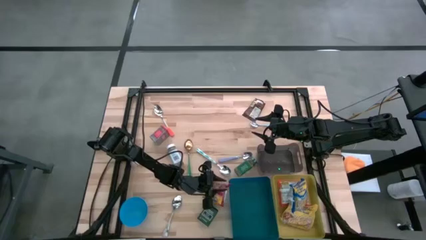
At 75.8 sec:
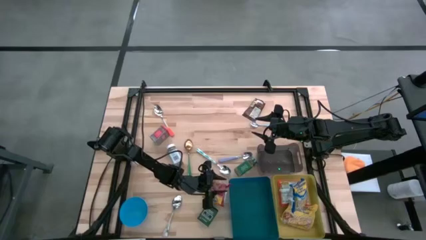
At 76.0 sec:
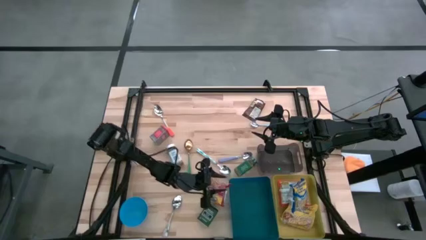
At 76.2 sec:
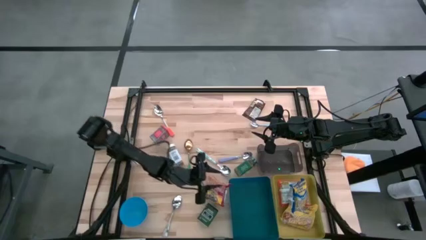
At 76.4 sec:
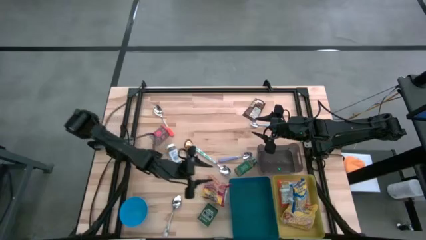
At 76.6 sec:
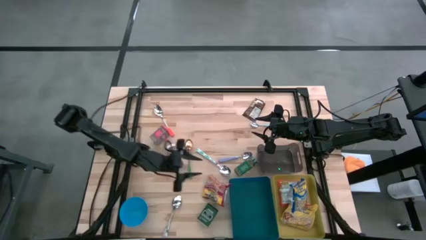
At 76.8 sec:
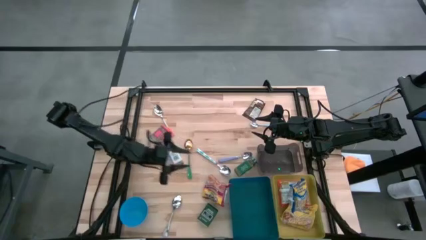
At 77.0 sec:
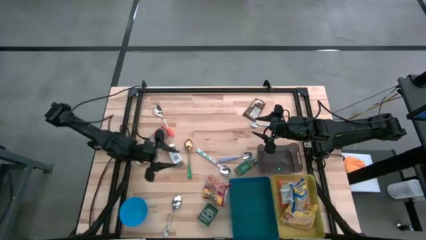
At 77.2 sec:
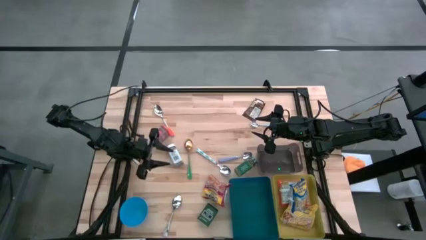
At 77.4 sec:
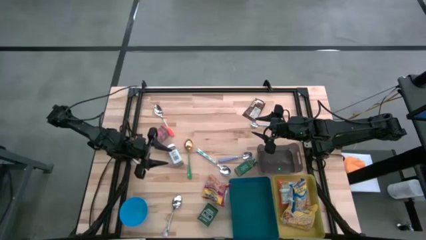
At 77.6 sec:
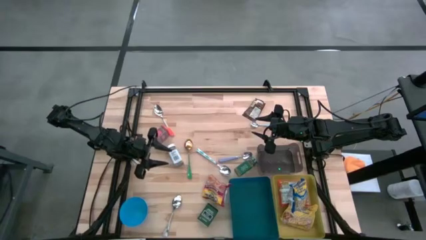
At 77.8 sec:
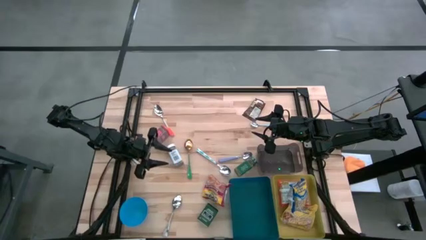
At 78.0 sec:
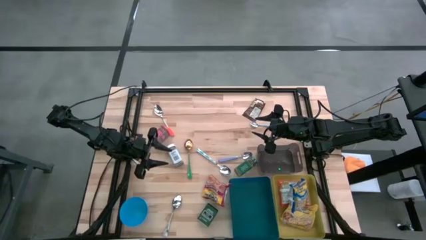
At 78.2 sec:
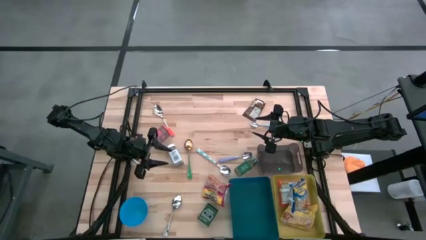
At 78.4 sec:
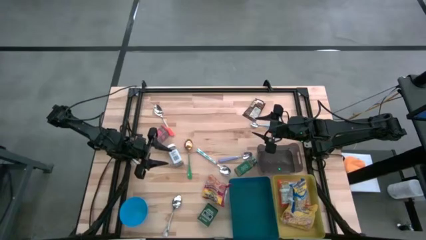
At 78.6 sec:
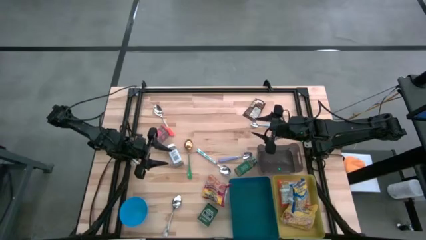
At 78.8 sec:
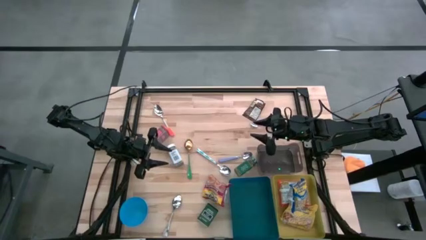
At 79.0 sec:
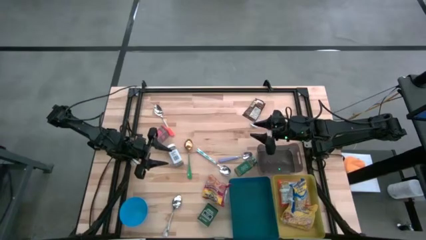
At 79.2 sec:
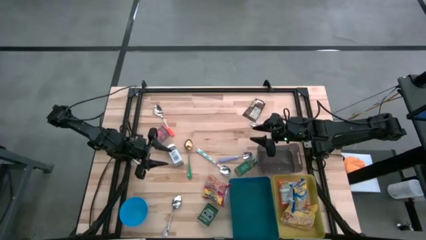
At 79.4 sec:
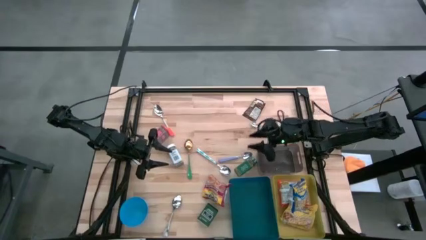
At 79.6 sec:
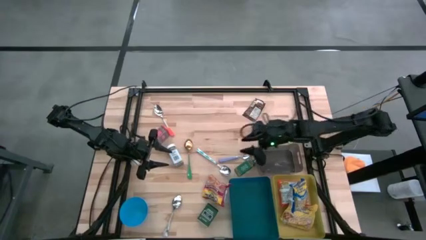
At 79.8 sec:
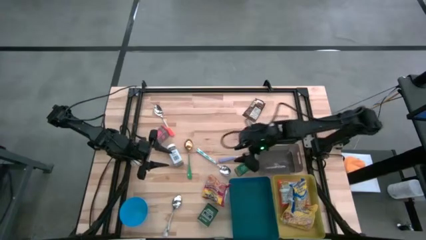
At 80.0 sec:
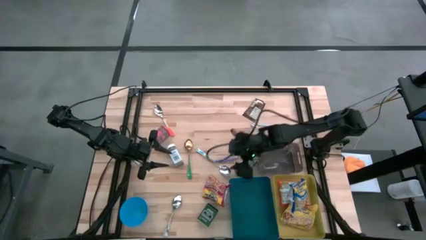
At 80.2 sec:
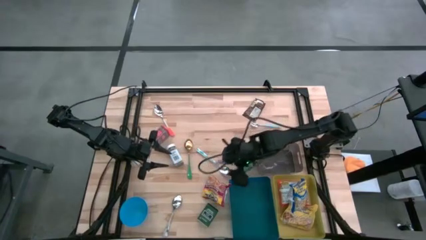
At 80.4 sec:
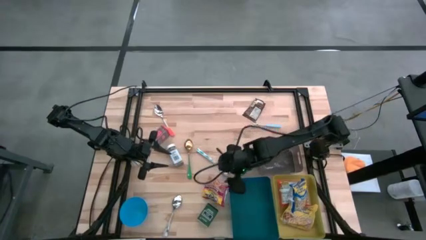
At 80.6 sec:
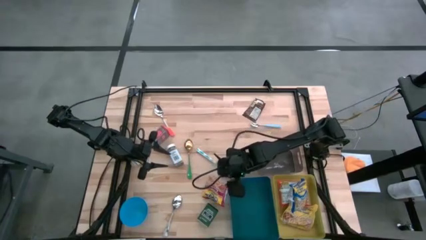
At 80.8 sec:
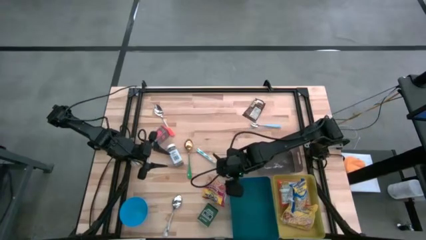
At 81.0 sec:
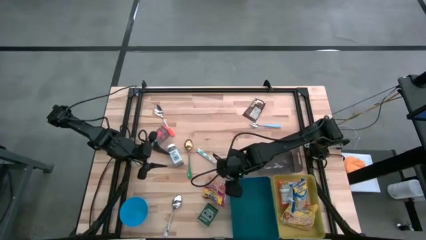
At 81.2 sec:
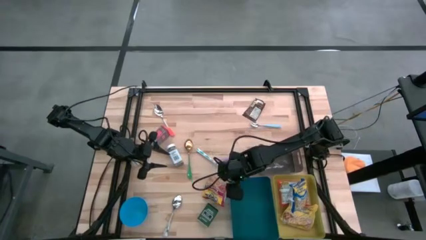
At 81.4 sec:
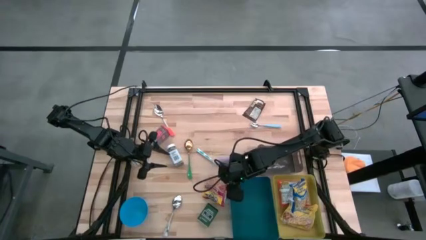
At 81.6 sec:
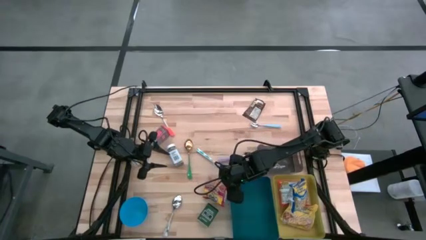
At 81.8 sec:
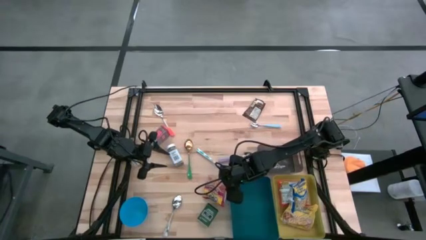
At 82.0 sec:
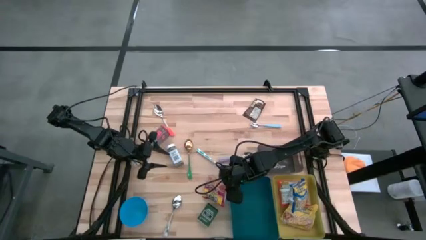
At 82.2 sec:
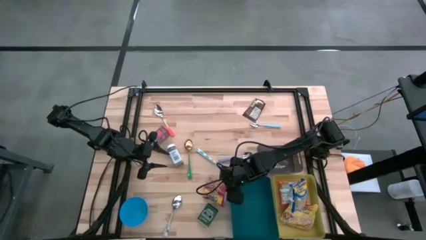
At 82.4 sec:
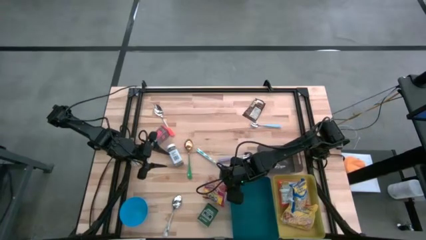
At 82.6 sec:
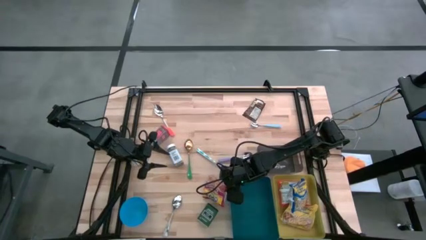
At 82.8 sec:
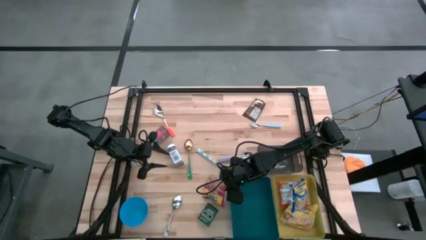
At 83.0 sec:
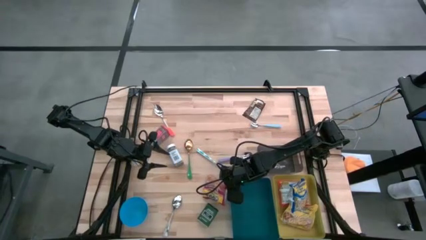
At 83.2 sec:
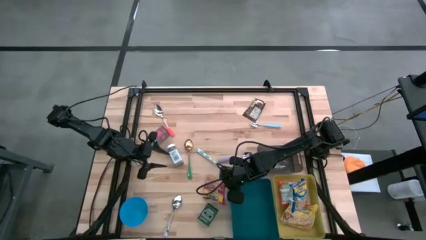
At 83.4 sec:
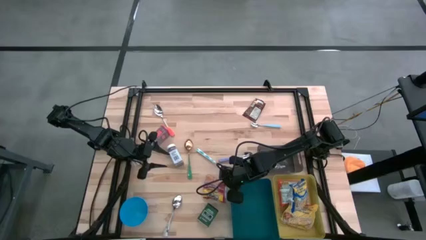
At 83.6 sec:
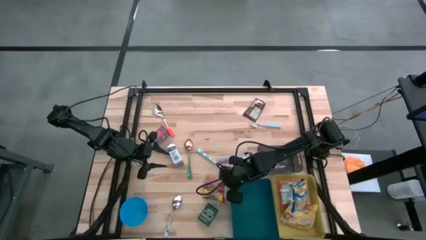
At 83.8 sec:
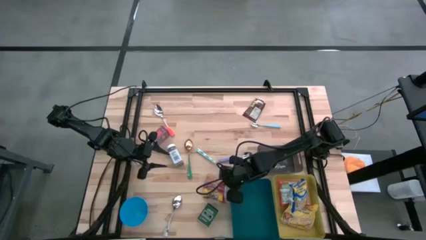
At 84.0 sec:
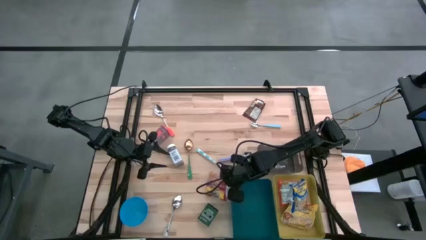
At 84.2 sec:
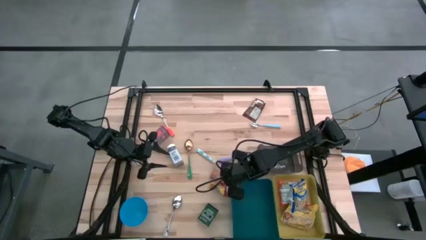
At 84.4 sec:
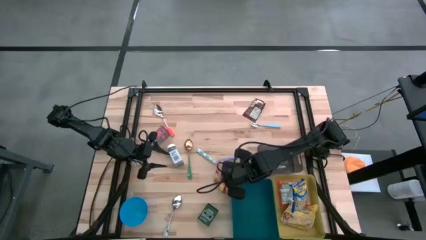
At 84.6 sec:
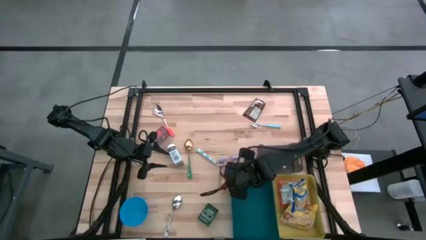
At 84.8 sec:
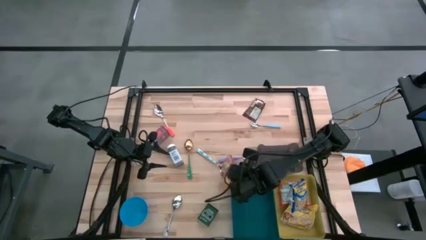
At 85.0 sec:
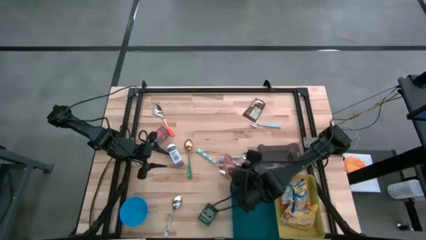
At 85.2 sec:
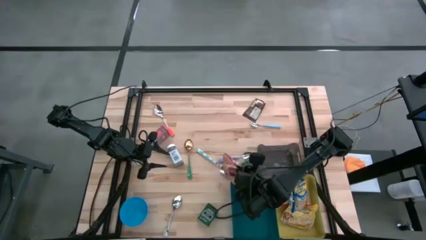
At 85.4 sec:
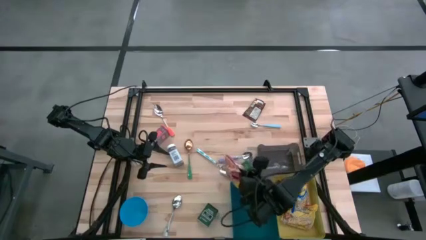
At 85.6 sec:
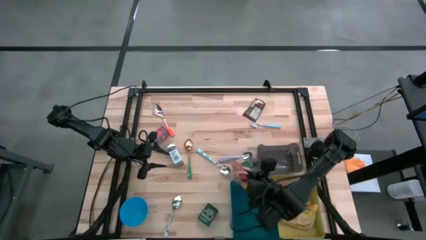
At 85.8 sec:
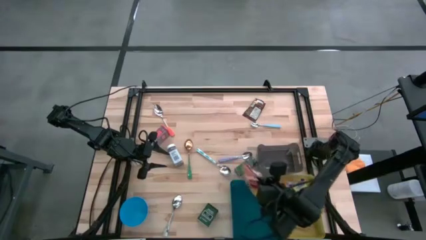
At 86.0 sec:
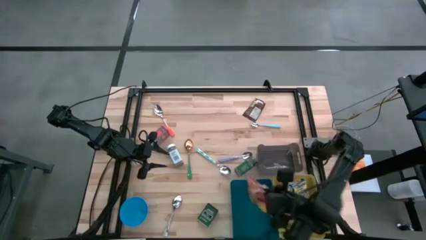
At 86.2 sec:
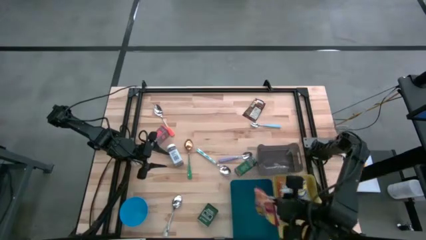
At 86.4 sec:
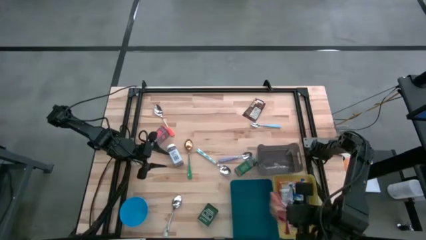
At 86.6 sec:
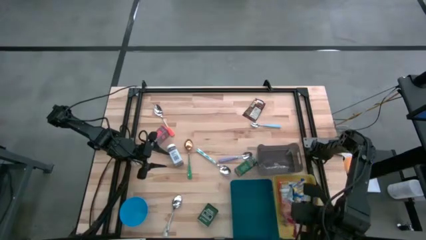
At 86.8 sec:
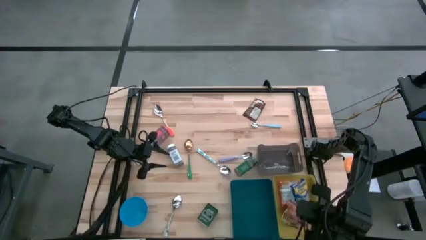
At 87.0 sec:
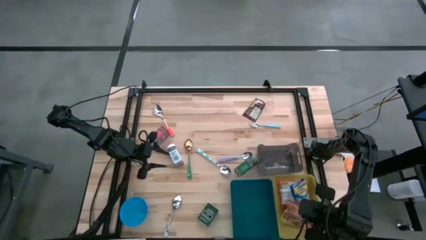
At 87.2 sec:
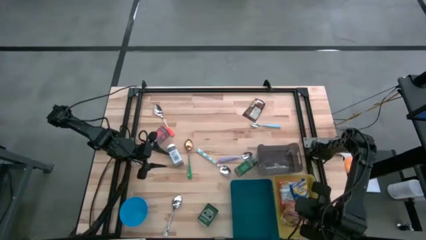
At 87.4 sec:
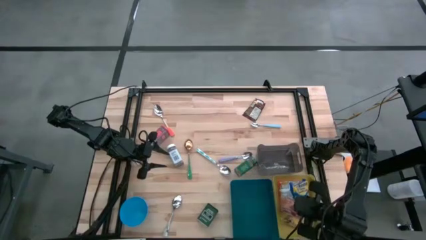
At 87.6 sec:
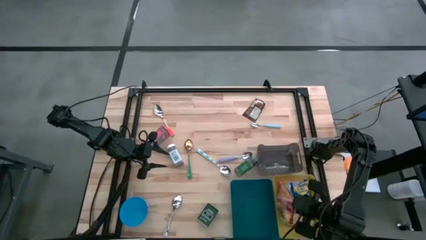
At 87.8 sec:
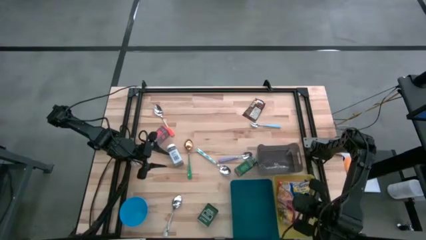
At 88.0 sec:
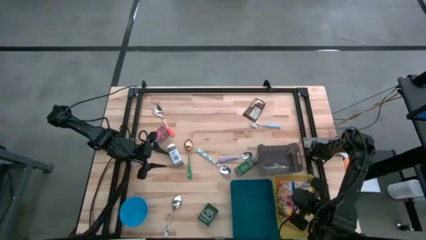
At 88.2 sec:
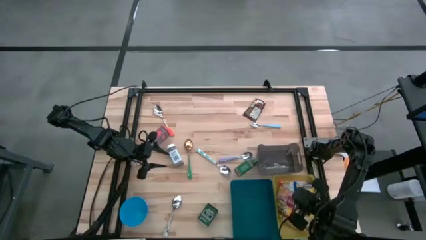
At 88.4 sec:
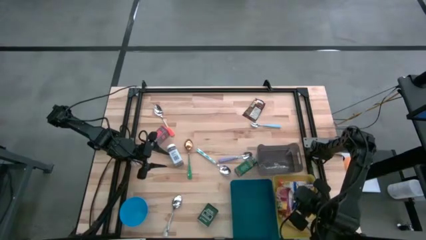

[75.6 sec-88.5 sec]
Put the red noodle pack into the yellow bin
